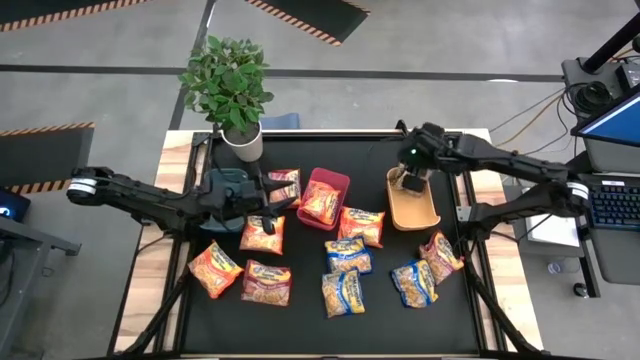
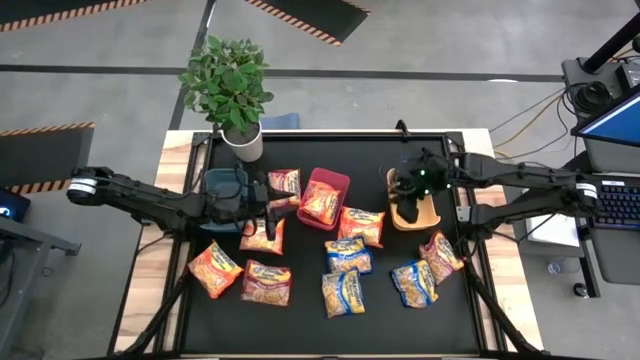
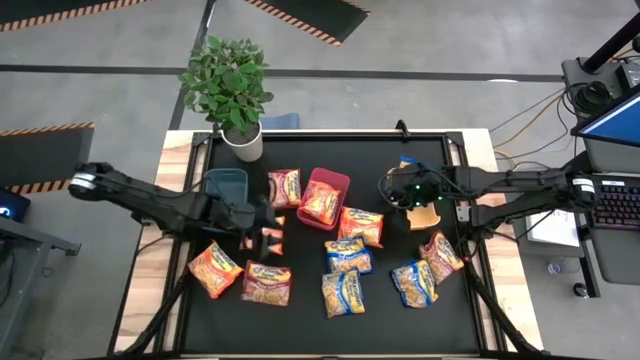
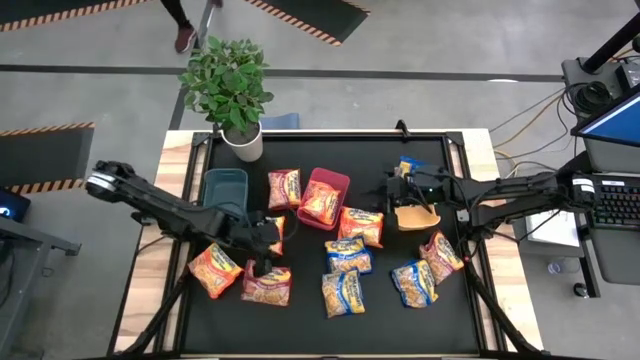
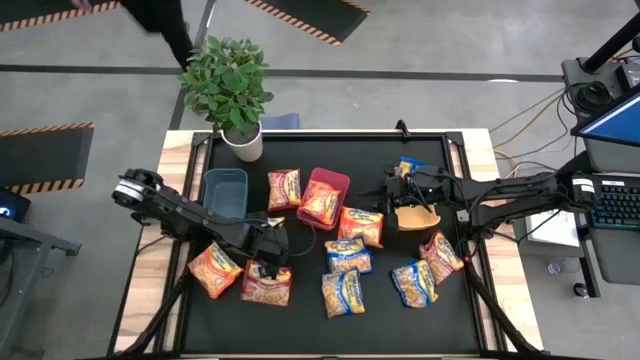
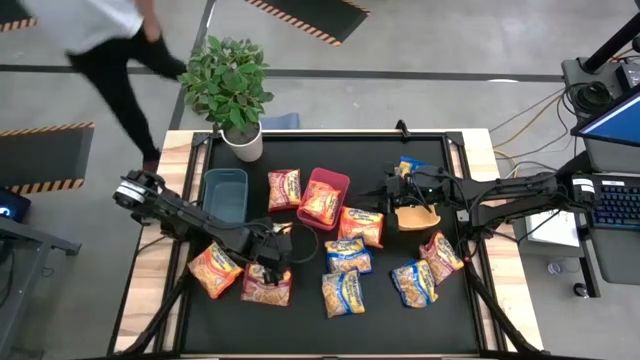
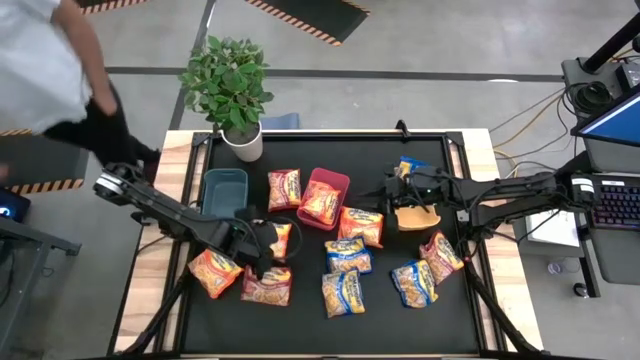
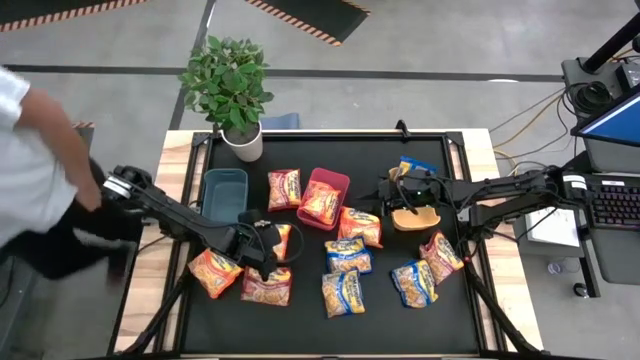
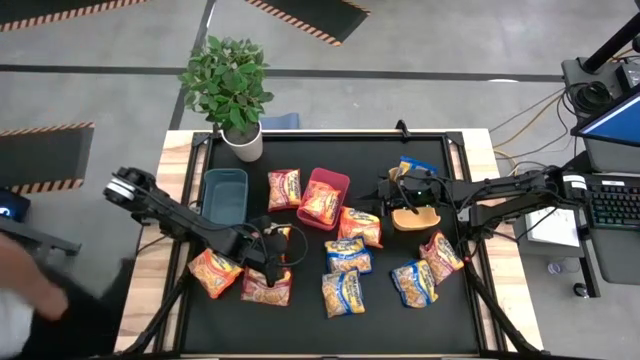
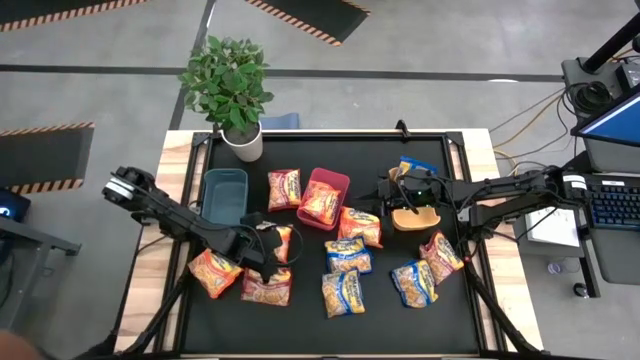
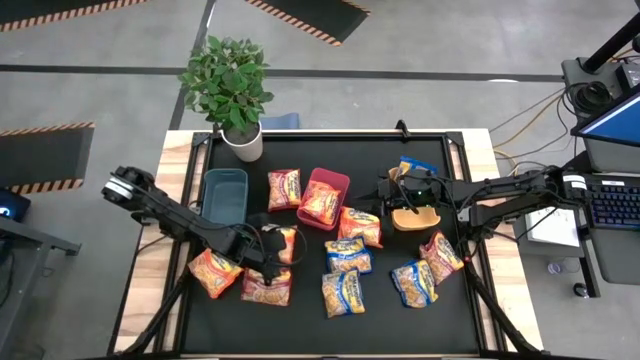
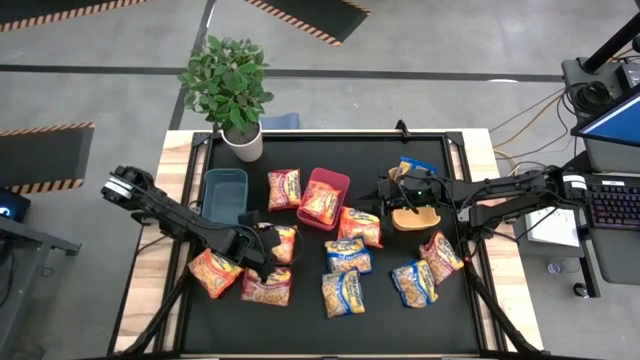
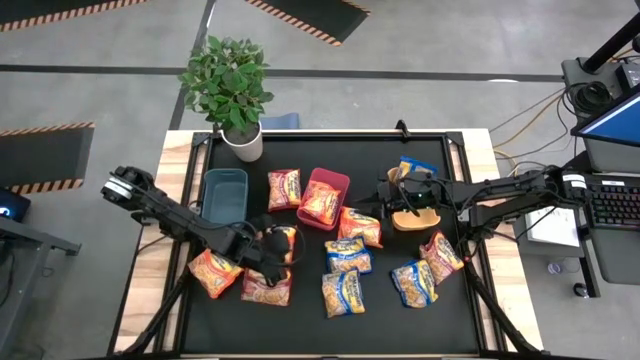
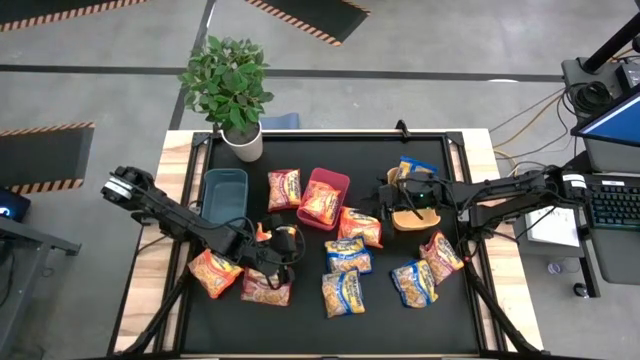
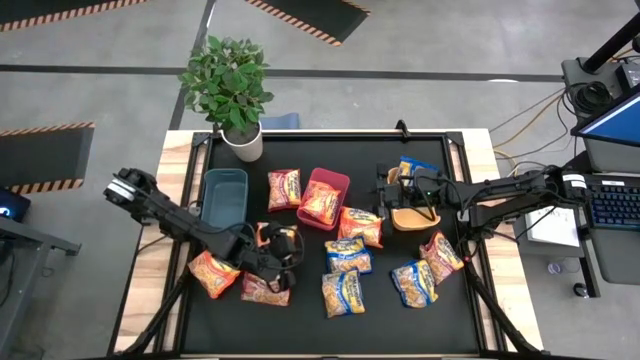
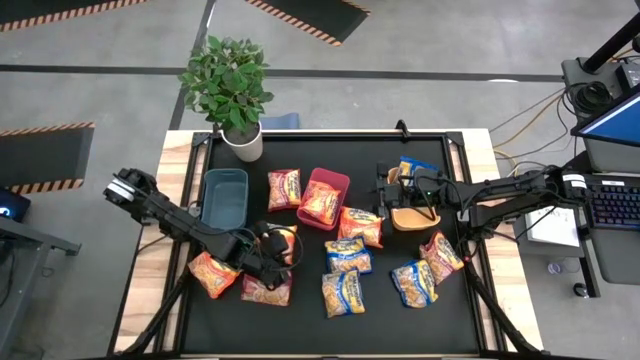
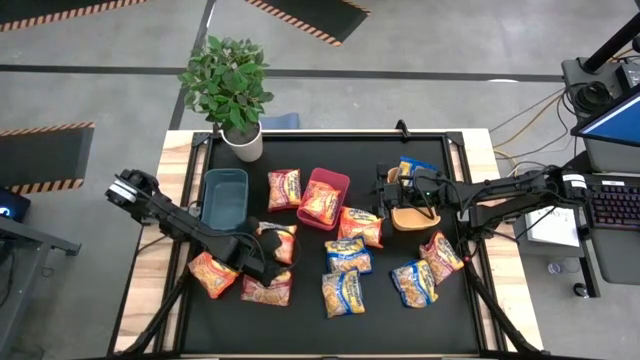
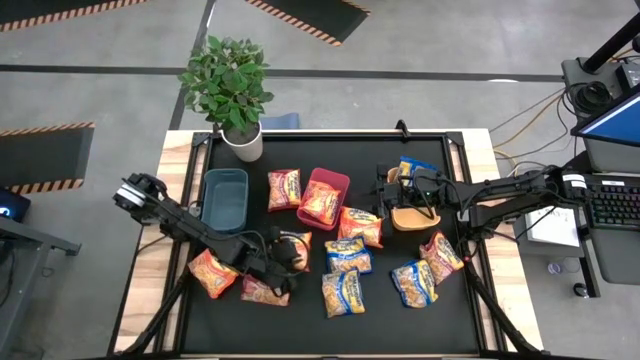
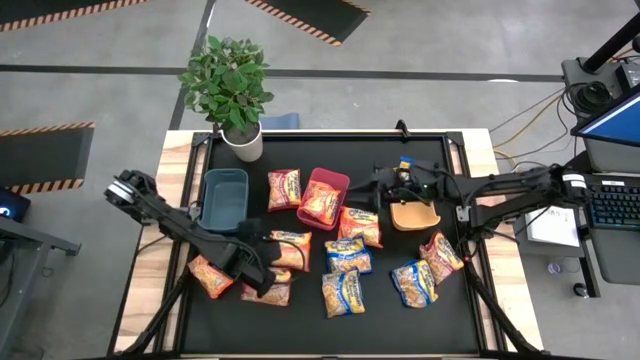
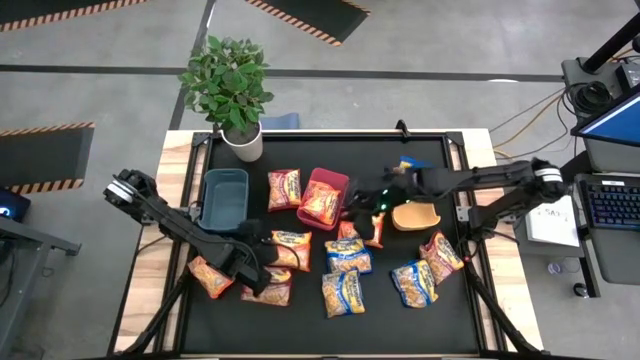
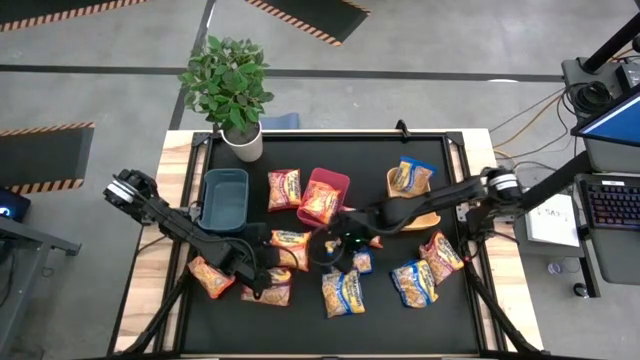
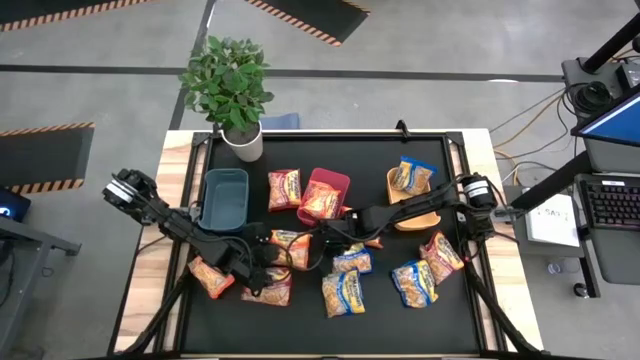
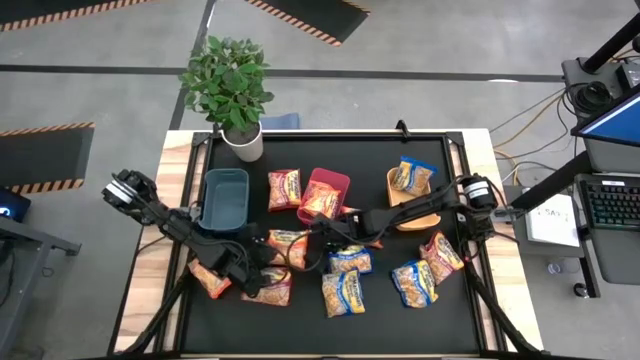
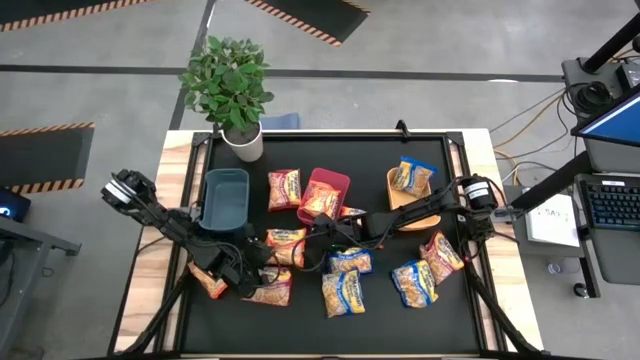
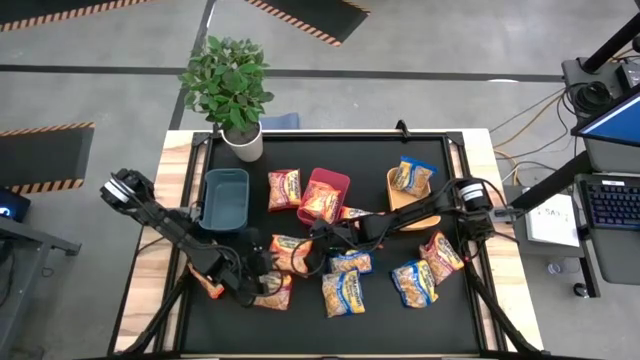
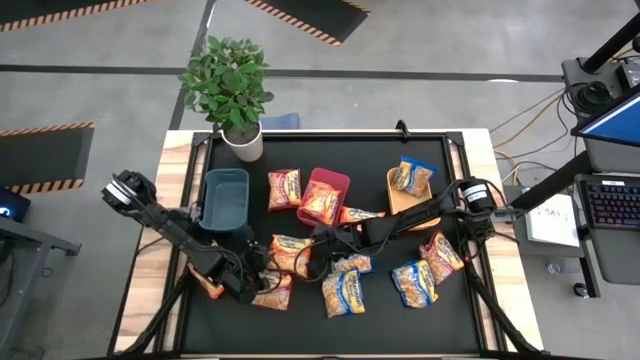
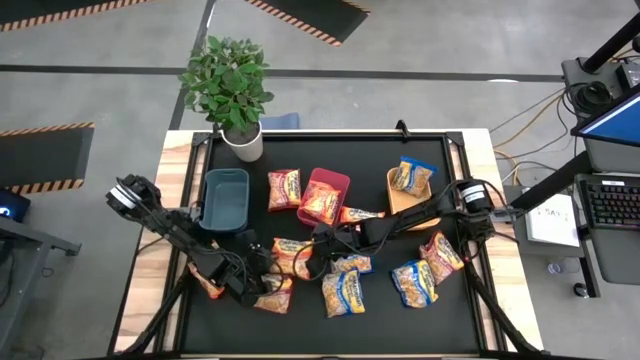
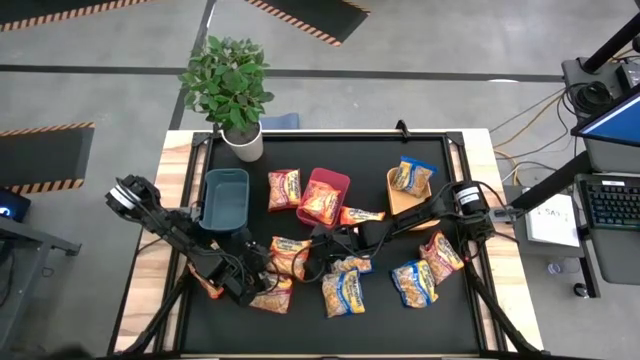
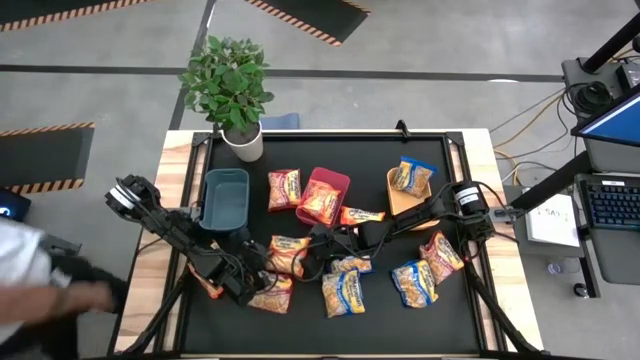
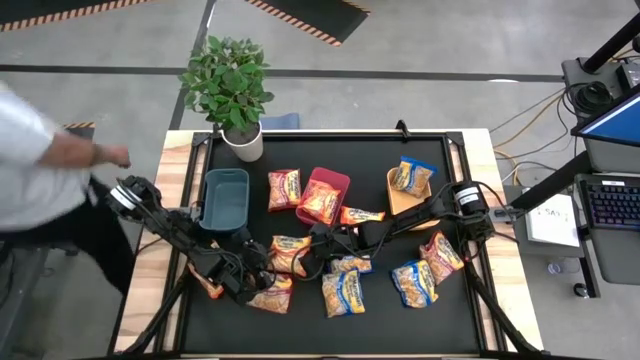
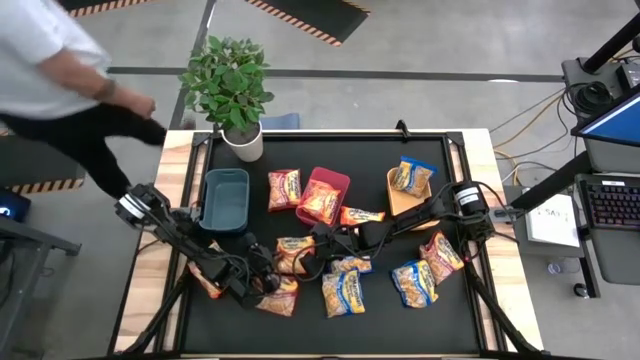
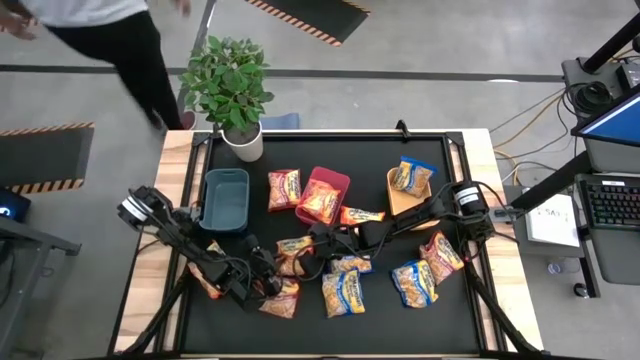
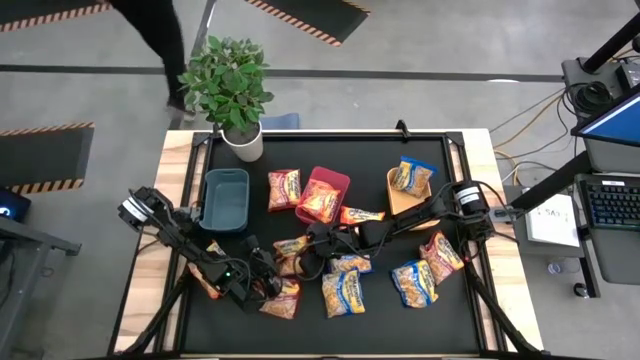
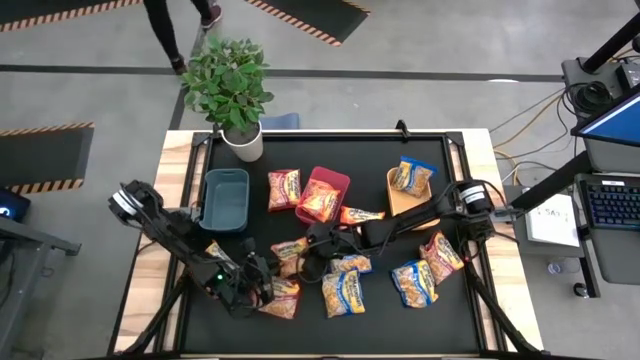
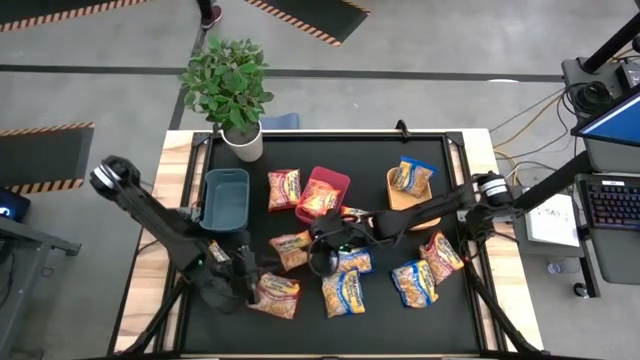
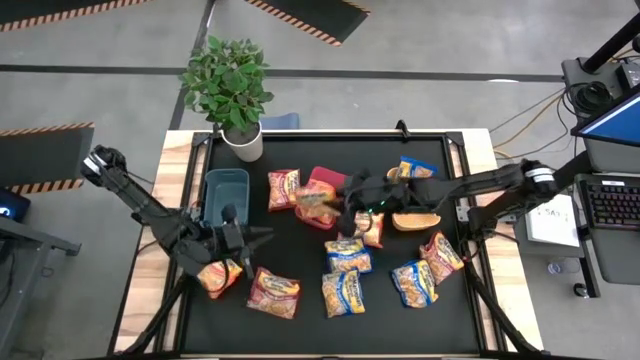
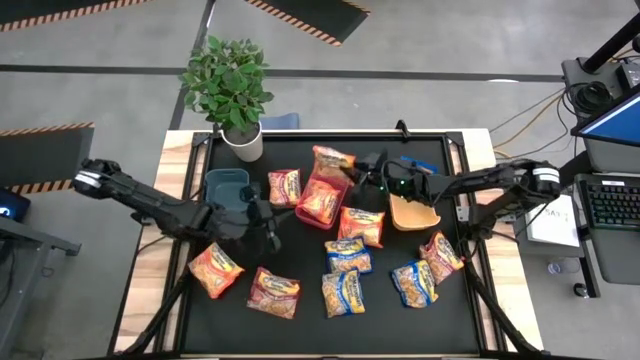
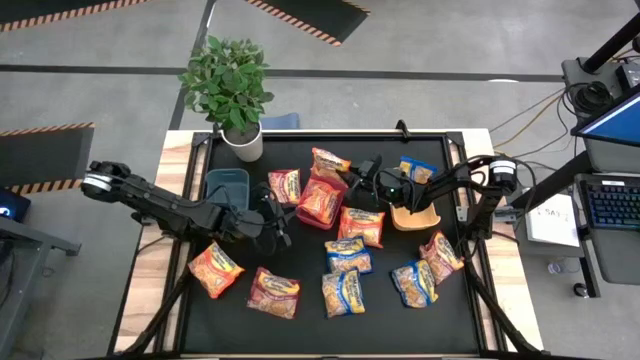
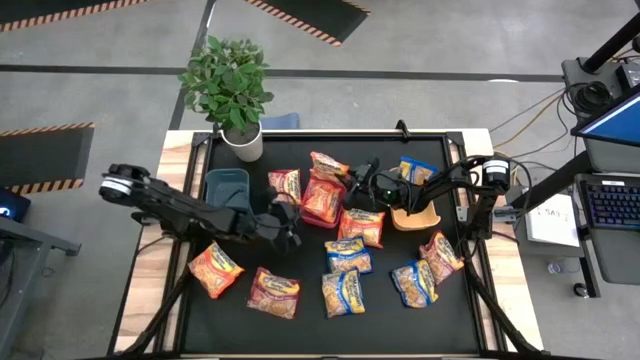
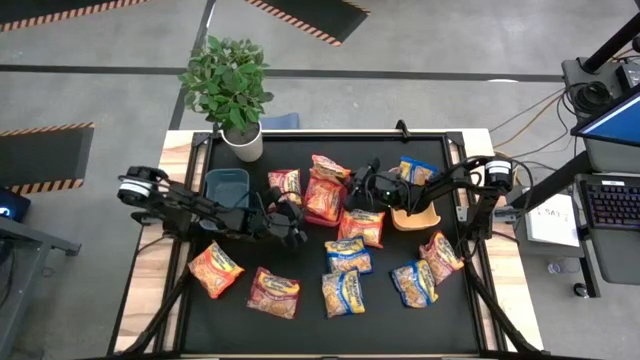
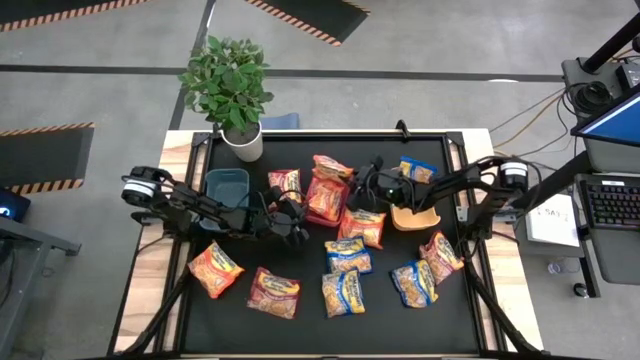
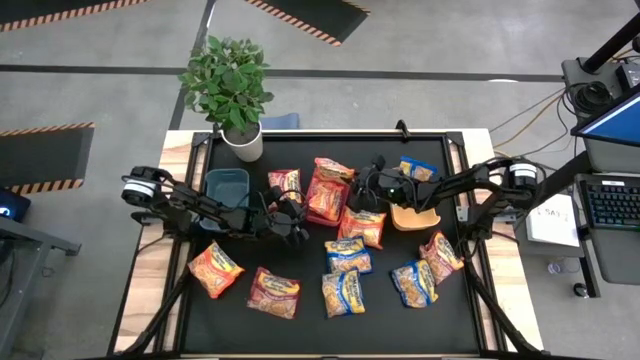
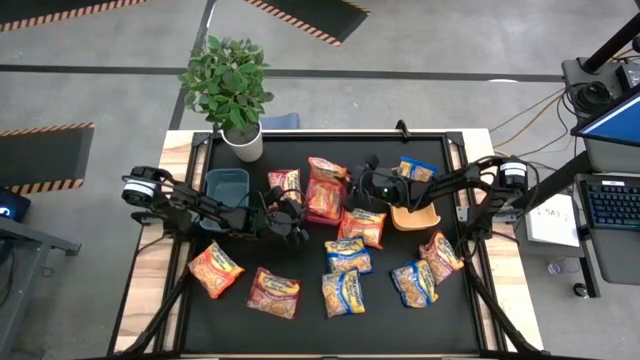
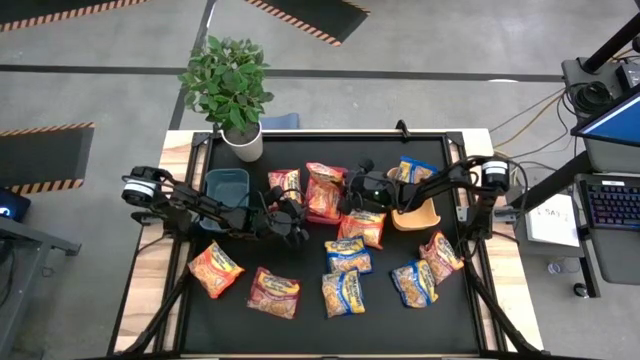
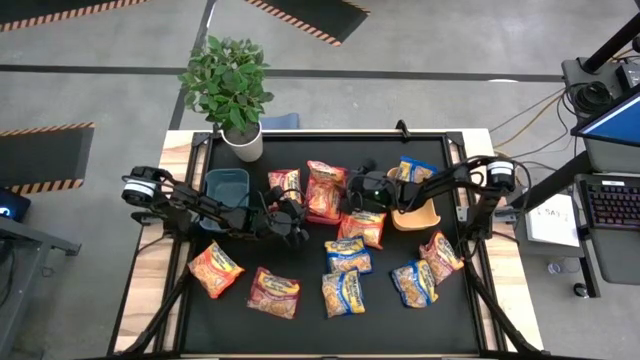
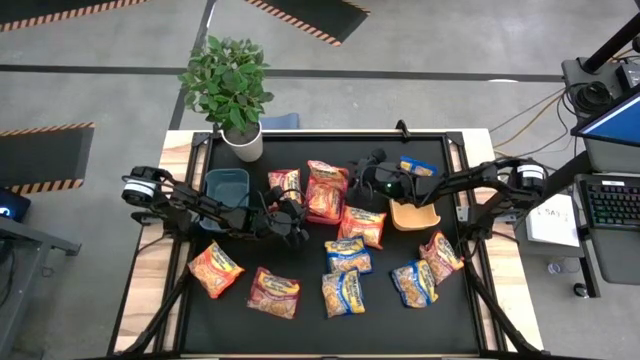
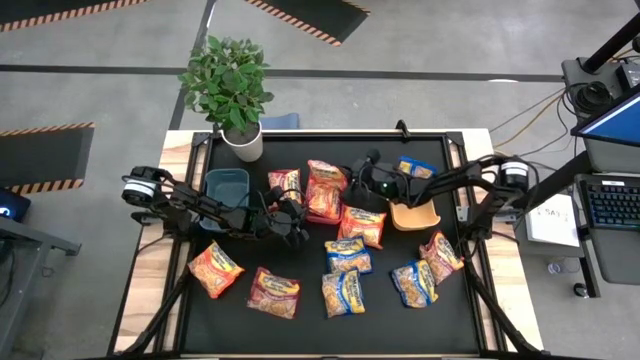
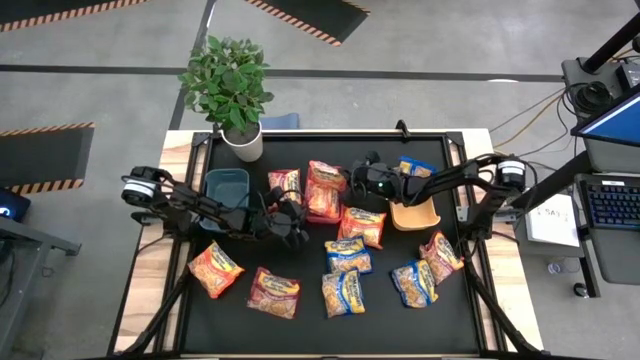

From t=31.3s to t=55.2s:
Task: Sort Maruchan noodles
Put the orange noodle pack into the red bin
